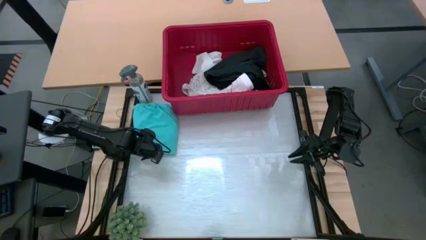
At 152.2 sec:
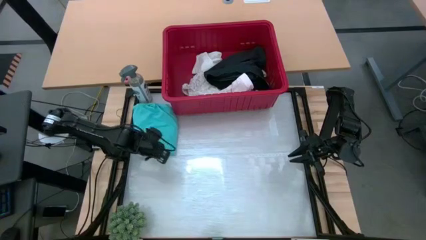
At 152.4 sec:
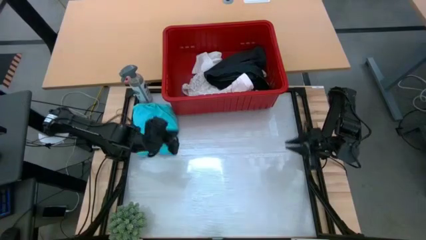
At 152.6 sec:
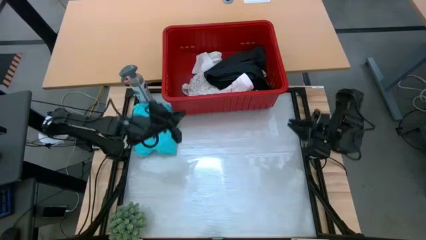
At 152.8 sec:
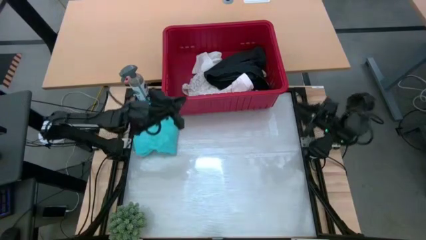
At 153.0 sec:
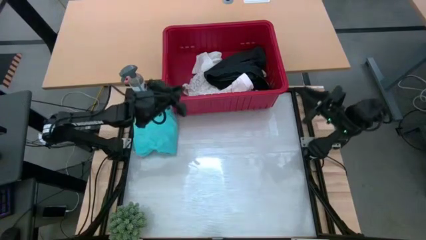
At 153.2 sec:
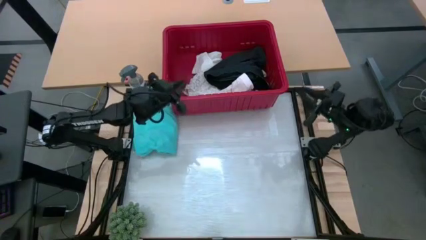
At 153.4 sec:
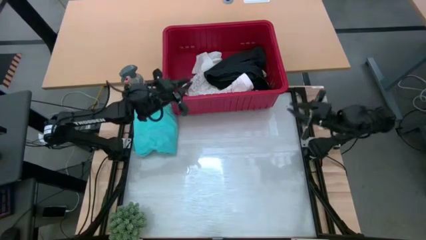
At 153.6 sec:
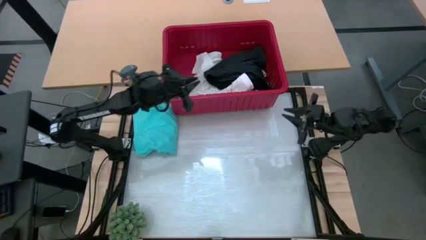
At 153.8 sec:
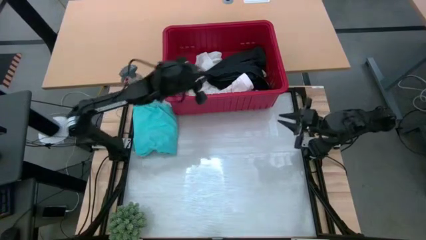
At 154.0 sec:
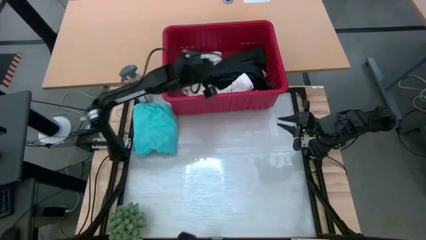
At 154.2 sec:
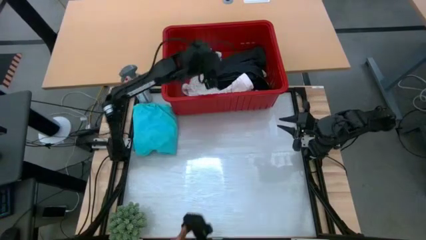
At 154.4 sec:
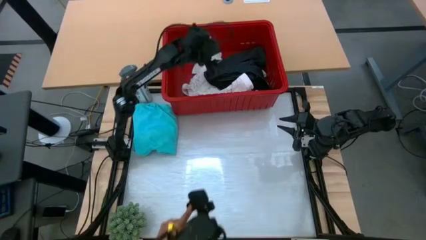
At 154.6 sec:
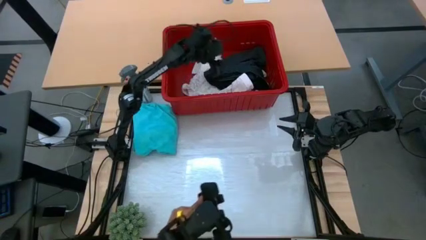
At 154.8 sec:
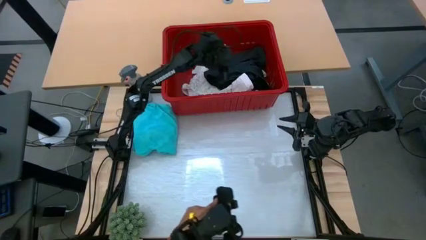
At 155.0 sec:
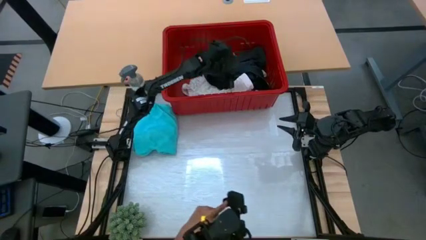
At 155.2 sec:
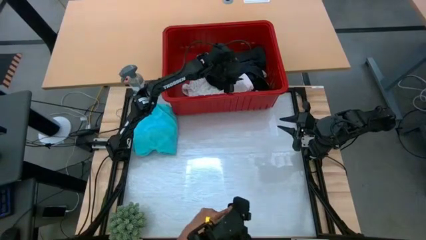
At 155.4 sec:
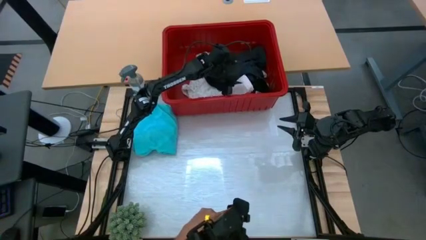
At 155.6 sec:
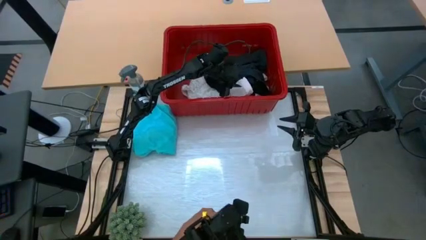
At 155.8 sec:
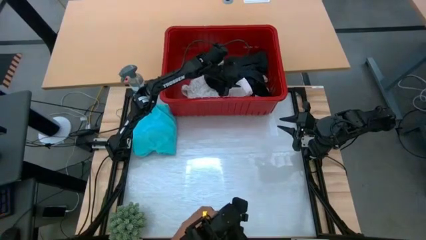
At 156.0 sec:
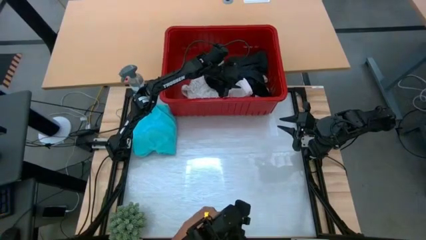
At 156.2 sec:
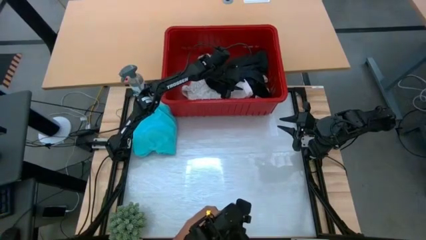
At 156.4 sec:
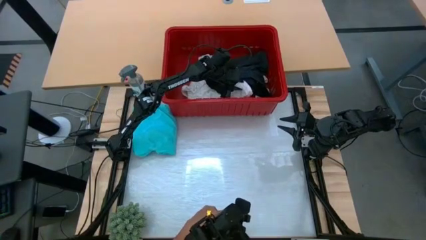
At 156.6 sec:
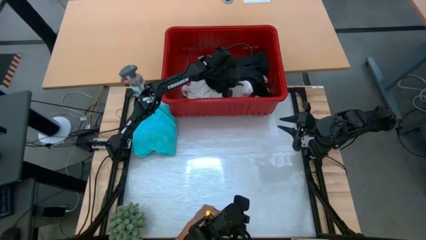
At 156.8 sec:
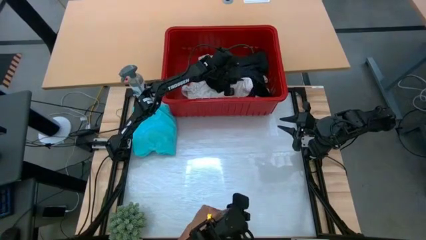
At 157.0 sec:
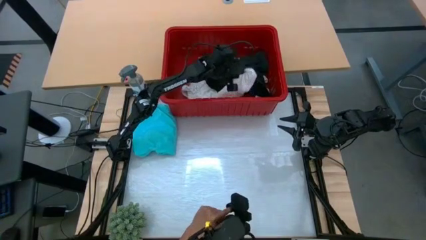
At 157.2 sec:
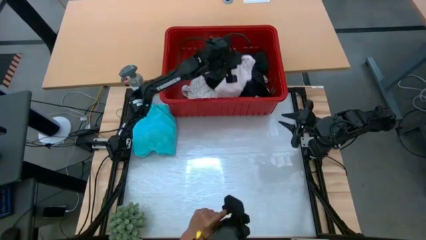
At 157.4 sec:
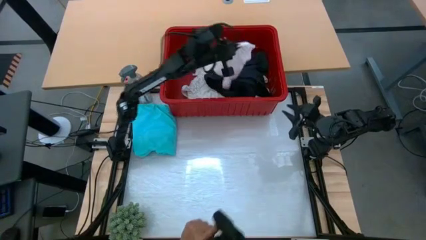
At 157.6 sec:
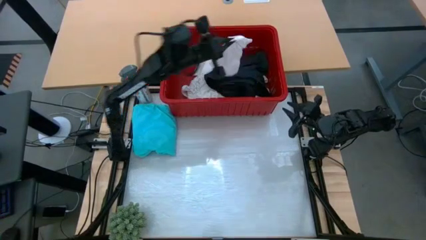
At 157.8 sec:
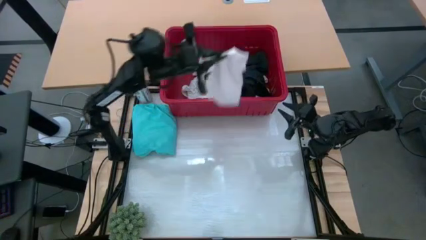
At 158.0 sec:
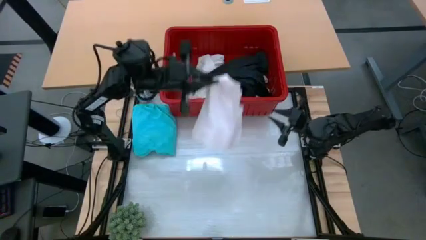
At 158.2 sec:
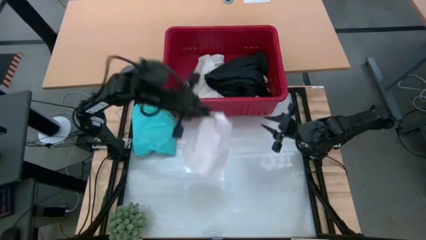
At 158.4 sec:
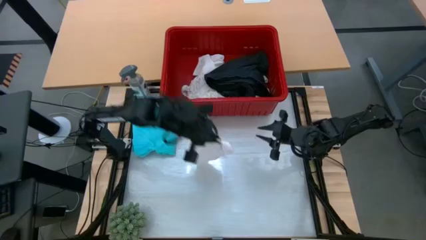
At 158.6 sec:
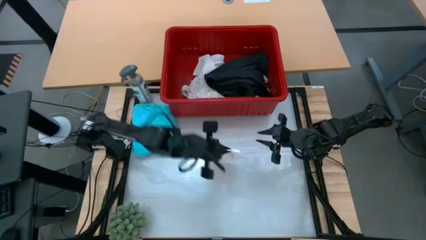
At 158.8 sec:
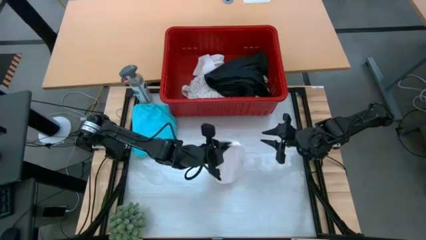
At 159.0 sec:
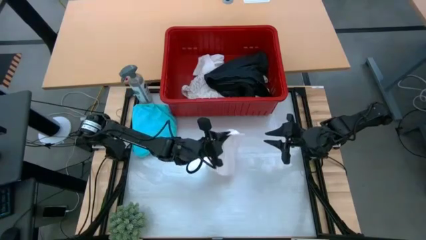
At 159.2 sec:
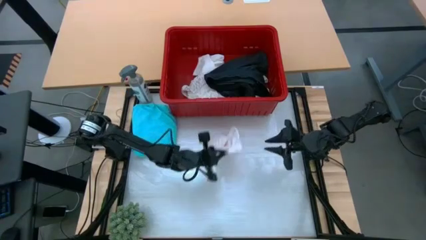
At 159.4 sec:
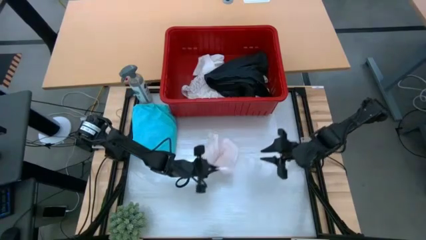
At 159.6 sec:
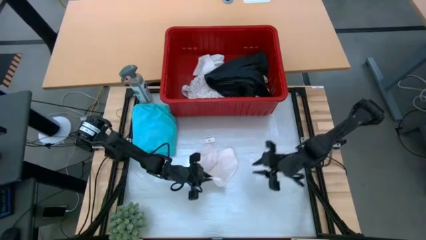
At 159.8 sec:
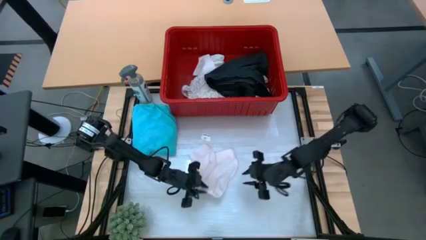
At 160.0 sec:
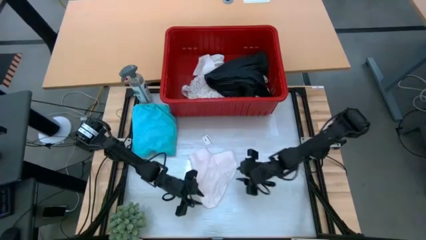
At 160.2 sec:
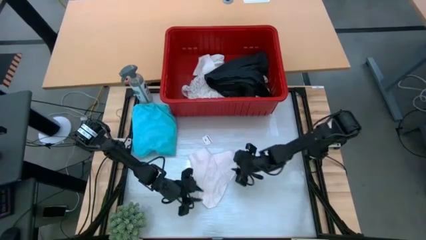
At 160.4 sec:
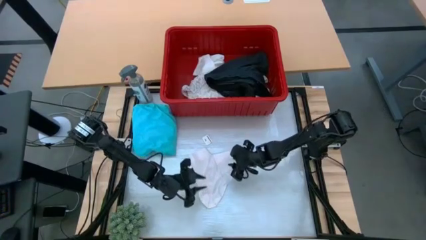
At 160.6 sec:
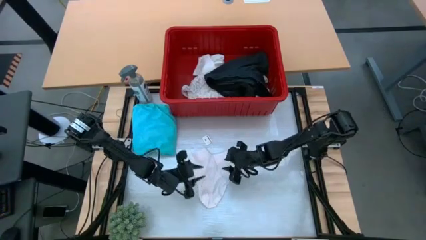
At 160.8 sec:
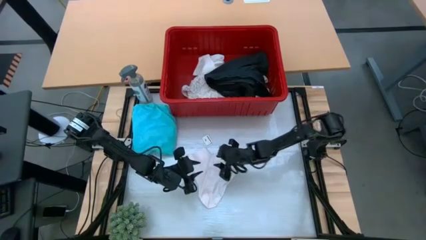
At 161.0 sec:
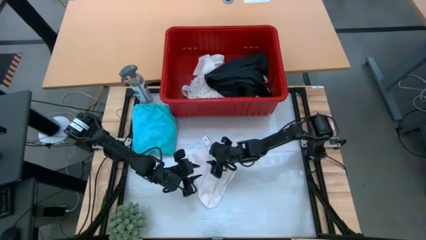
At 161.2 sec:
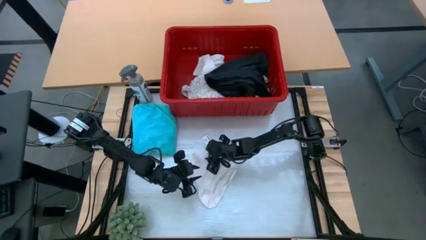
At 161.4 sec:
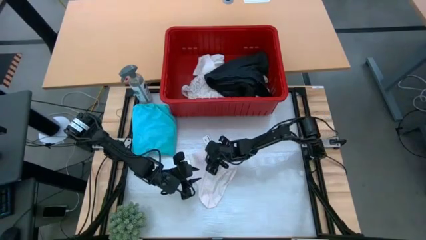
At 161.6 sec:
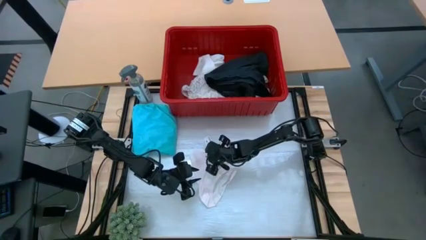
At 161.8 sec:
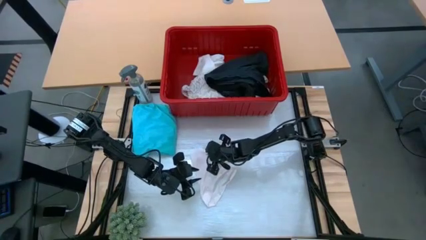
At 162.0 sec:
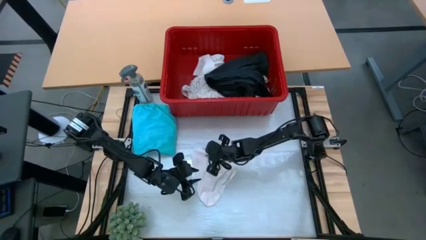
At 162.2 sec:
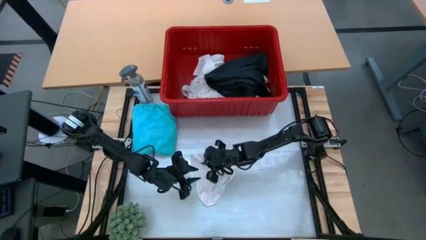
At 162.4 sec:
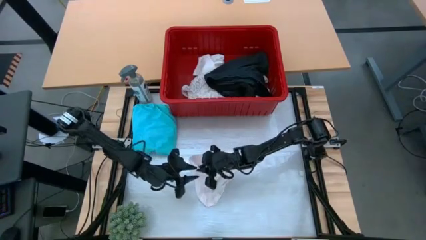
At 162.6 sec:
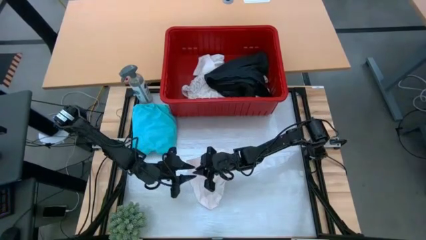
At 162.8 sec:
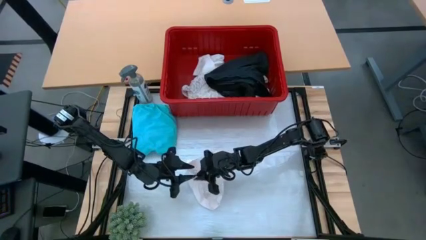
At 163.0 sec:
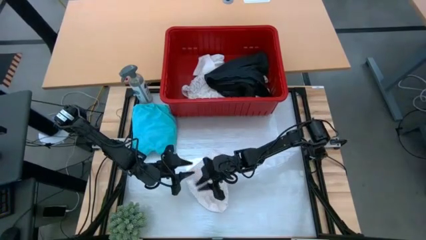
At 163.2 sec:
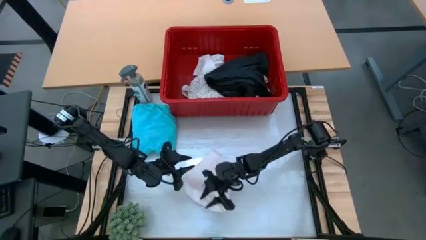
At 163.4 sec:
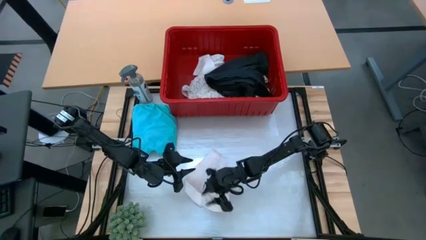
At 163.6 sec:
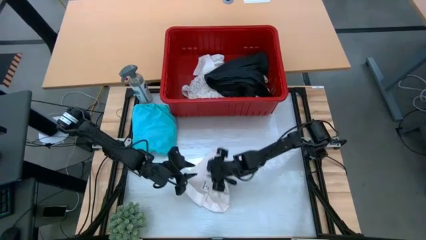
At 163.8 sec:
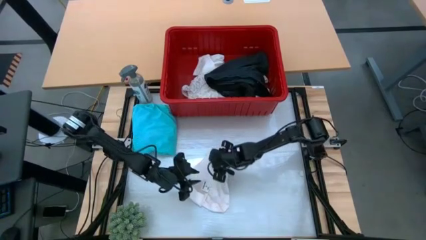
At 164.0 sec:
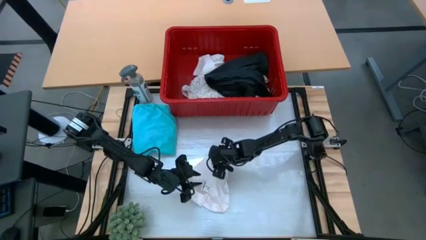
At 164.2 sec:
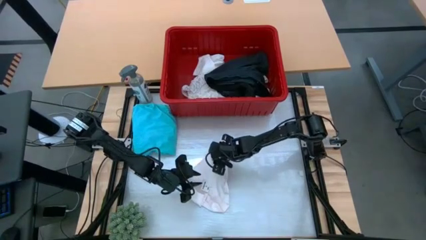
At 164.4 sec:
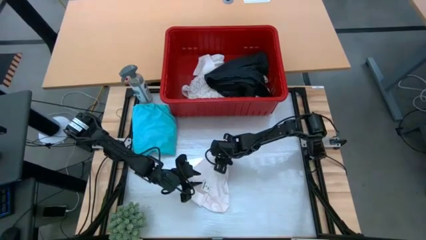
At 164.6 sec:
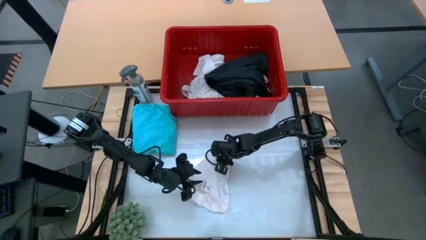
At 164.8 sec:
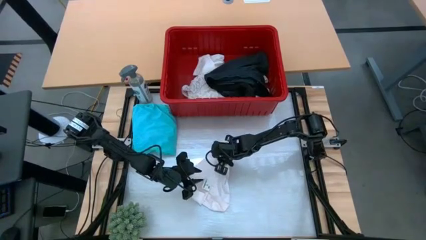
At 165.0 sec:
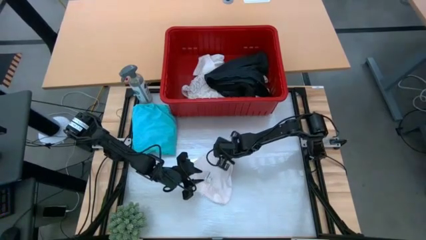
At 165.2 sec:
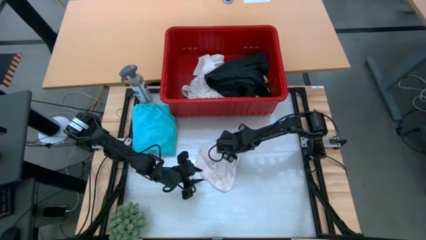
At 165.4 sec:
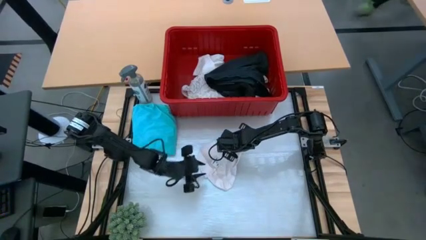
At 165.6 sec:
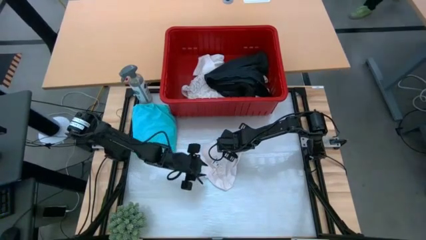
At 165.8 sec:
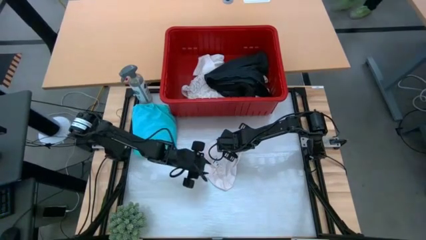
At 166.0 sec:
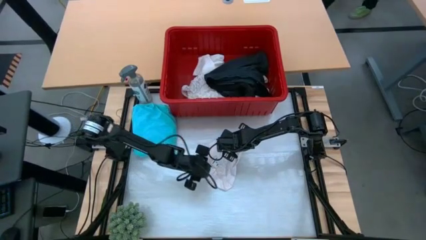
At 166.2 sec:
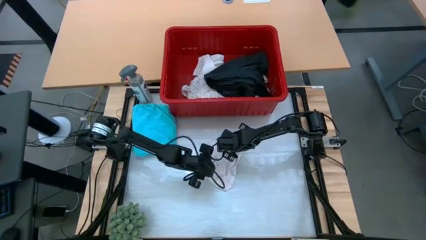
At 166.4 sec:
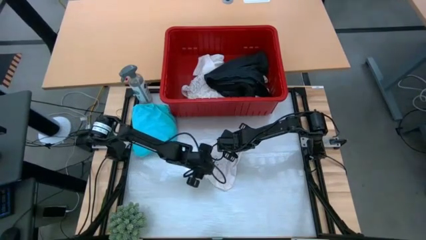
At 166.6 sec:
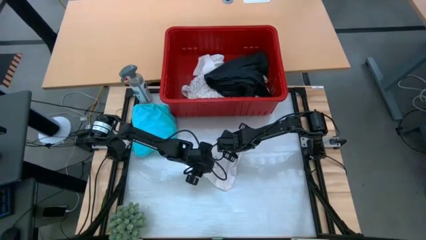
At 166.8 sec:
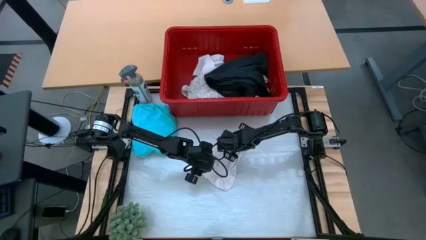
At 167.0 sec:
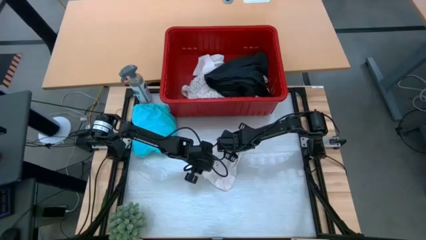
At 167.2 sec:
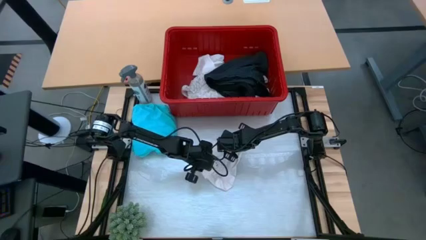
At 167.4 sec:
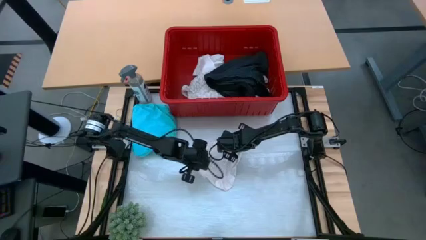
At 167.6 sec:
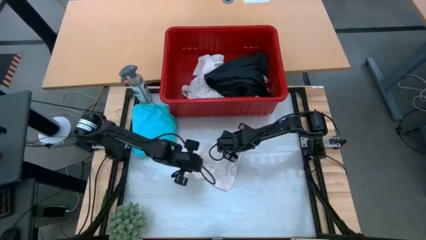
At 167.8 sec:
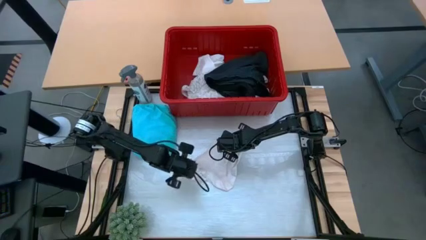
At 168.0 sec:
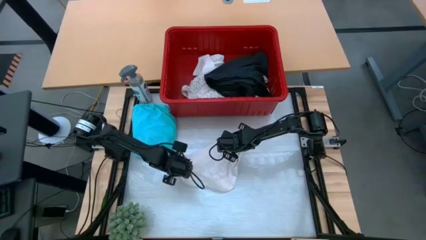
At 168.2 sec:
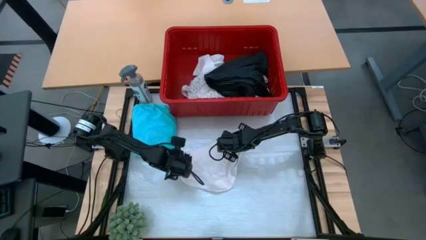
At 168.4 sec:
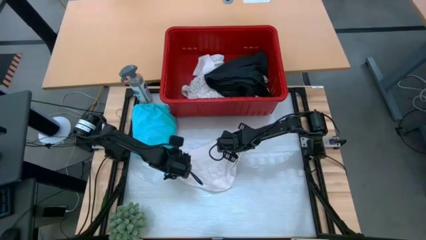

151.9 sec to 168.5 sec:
Task: Fold laundry
Fold the white underwear

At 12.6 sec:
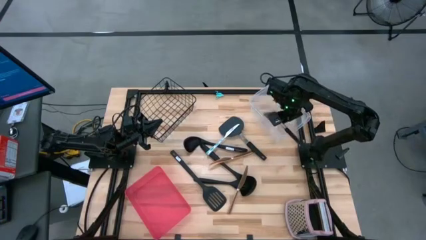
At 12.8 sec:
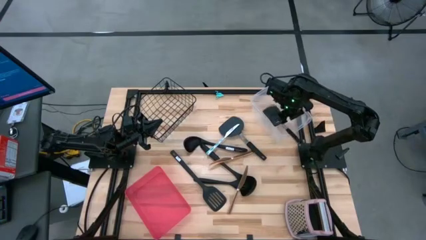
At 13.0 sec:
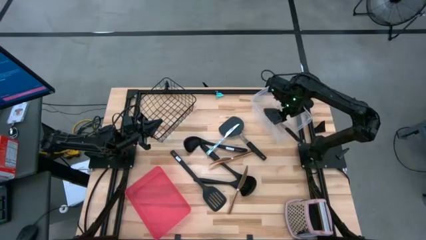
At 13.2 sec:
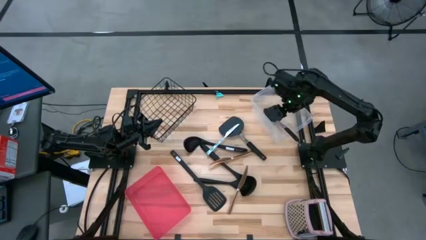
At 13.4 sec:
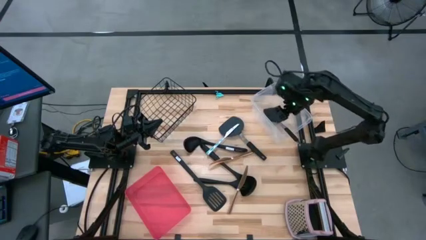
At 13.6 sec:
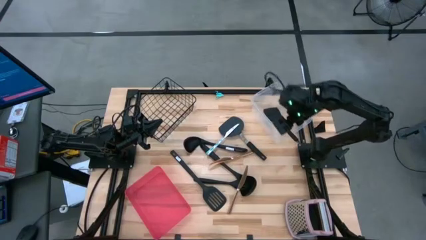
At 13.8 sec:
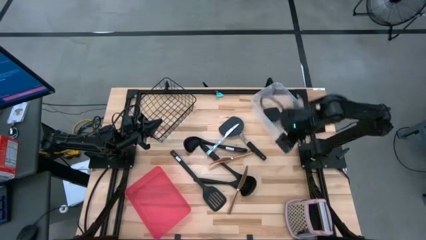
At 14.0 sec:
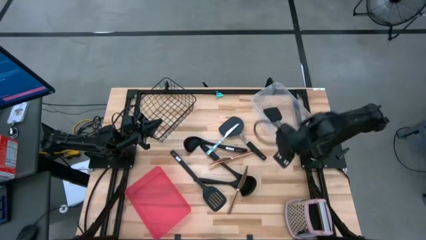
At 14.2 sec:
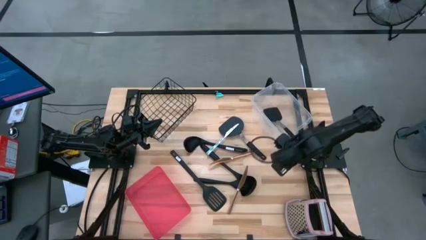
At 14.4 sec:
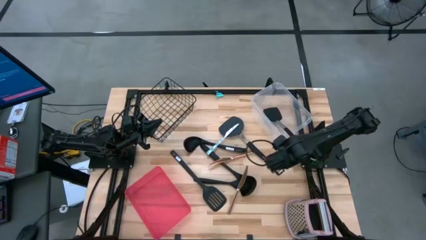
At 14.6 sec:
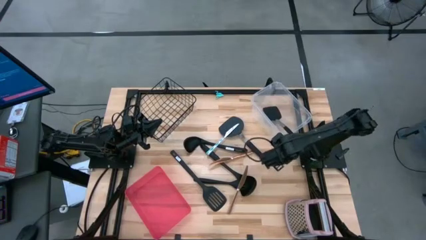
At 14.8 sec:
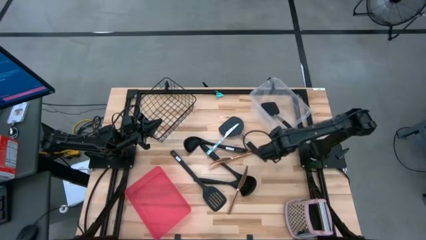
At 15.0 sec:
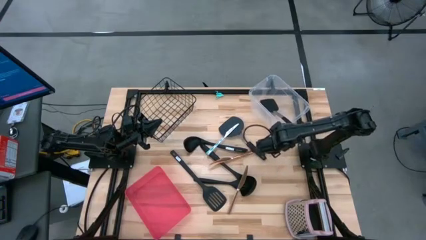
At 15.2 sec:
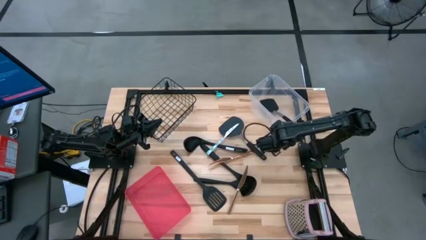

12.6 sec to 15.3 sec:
Task: Pick & Place Kitchen Items
Adjust the transparent bin
